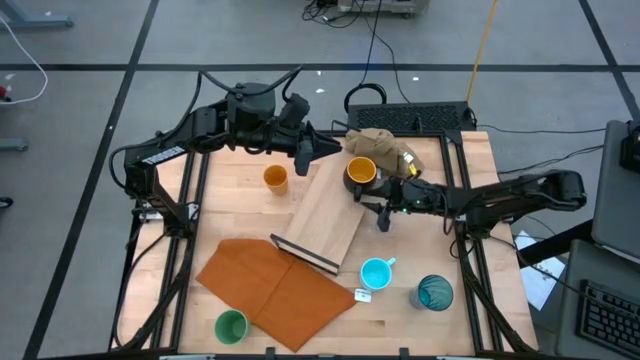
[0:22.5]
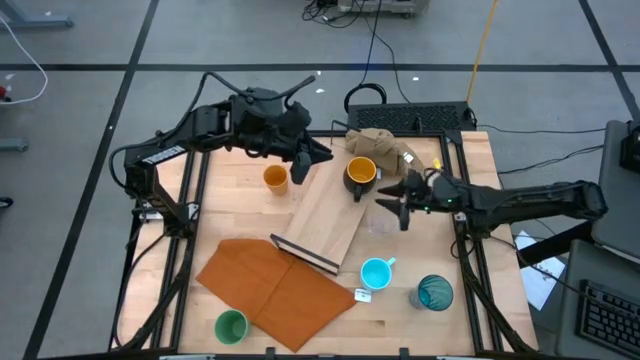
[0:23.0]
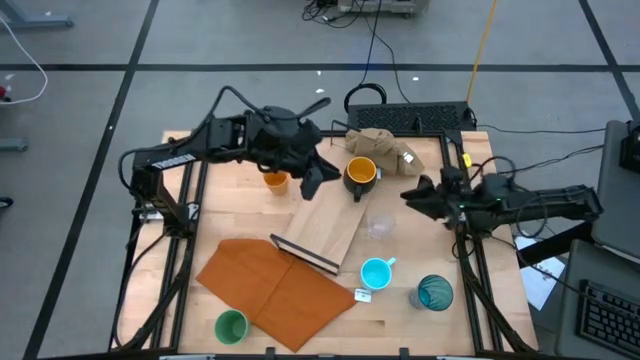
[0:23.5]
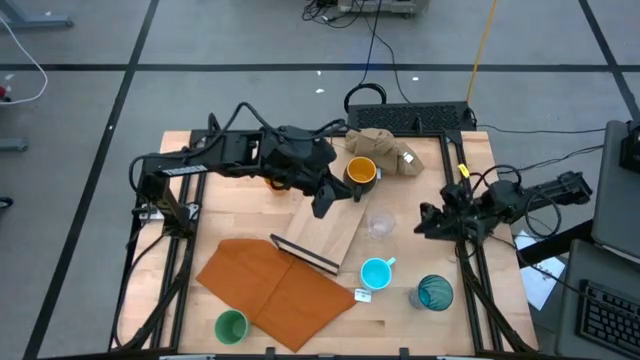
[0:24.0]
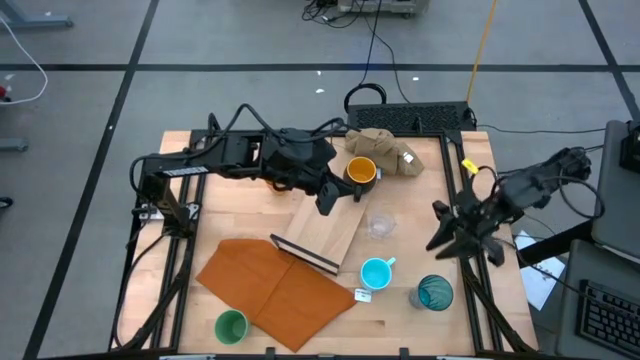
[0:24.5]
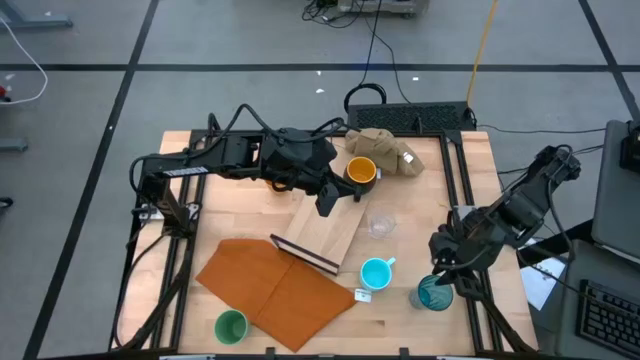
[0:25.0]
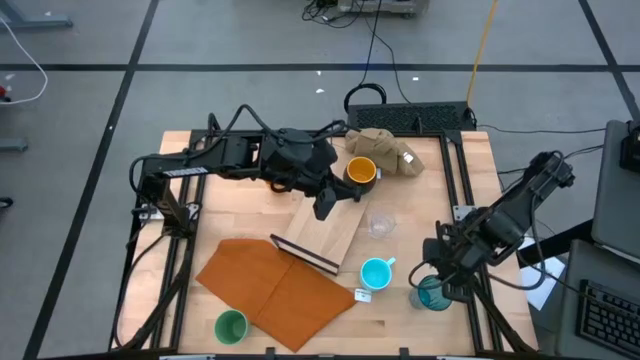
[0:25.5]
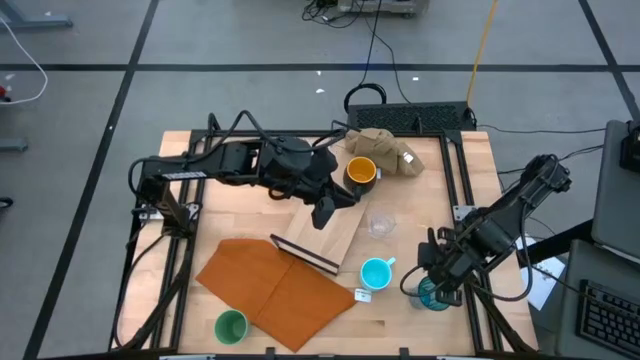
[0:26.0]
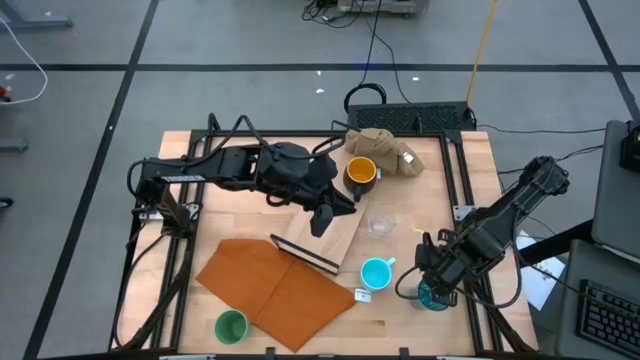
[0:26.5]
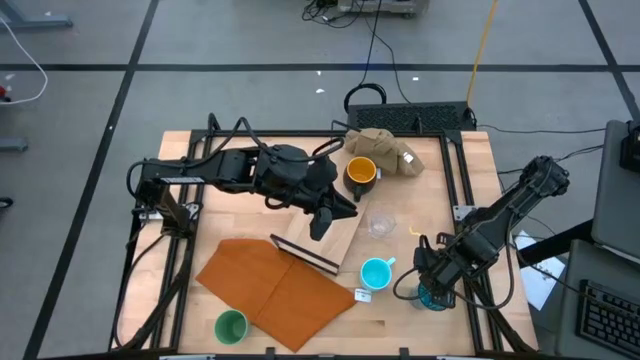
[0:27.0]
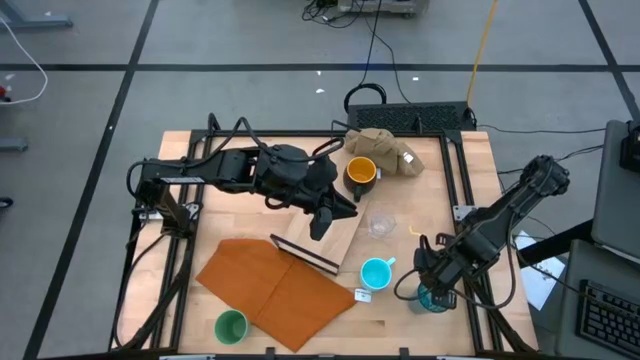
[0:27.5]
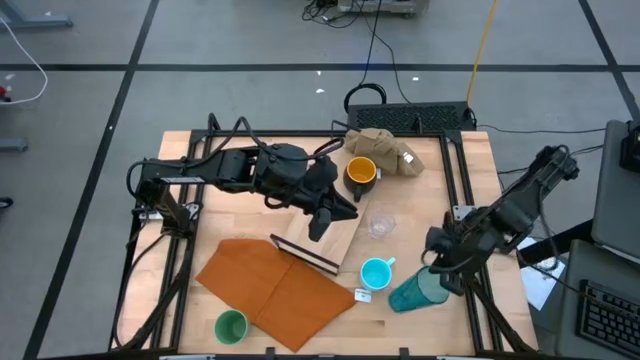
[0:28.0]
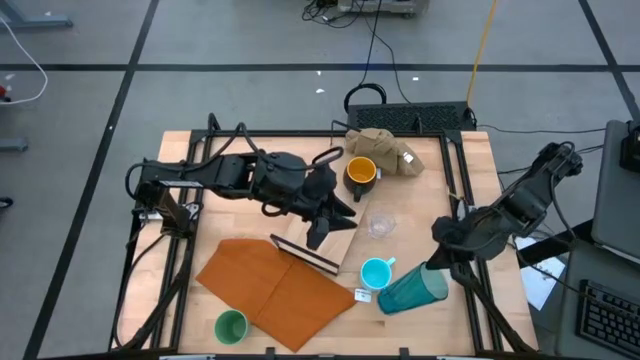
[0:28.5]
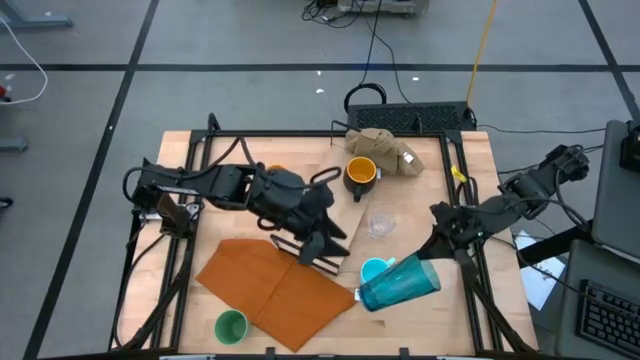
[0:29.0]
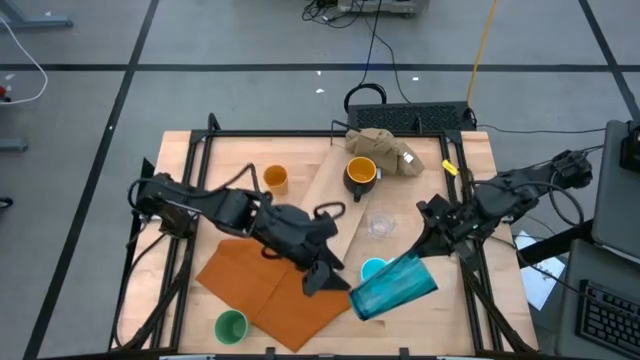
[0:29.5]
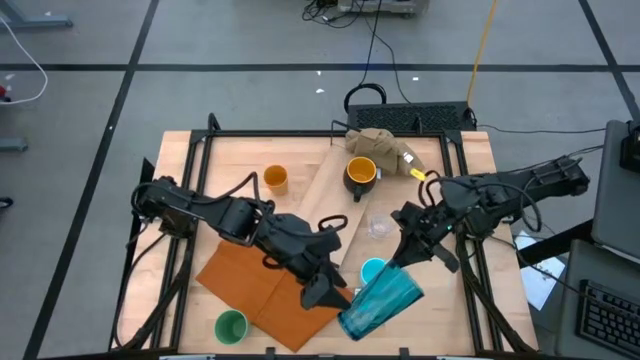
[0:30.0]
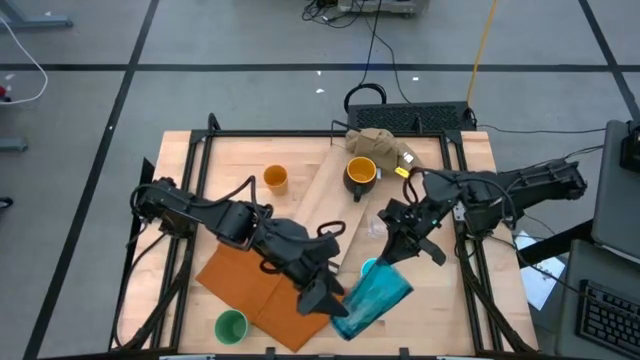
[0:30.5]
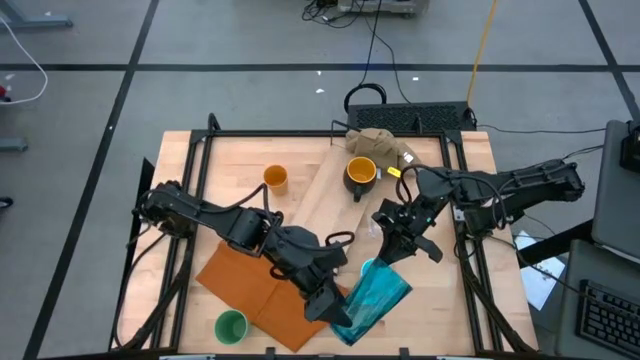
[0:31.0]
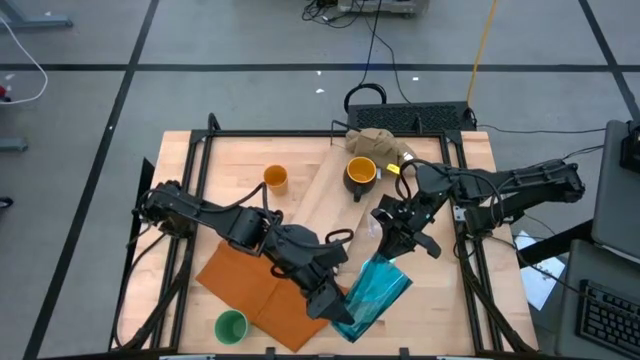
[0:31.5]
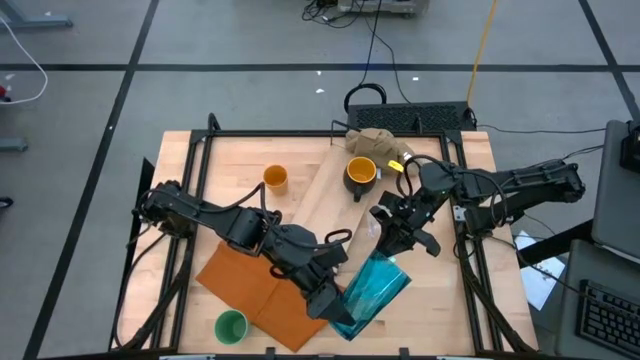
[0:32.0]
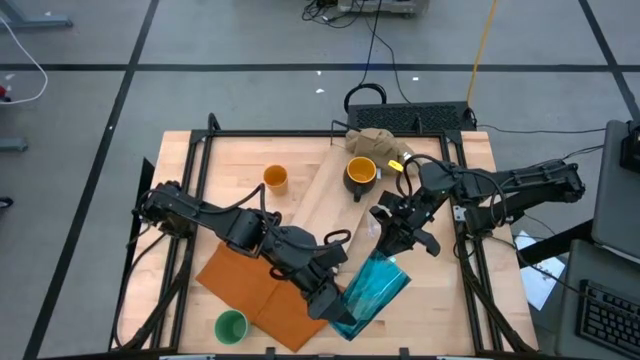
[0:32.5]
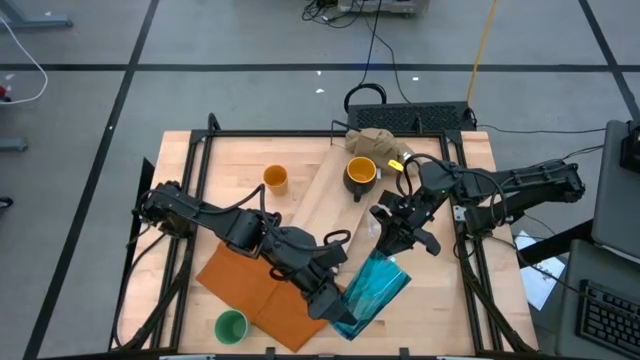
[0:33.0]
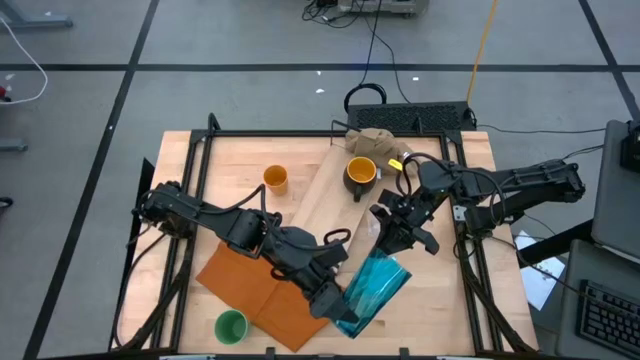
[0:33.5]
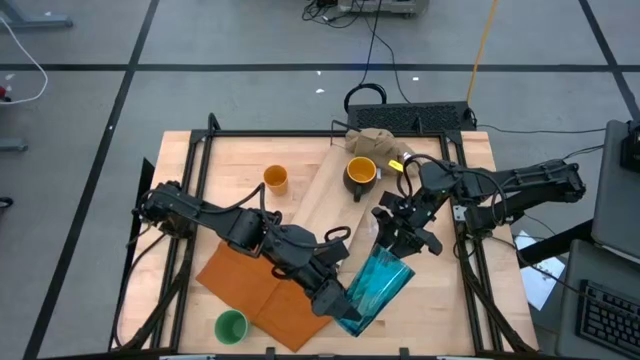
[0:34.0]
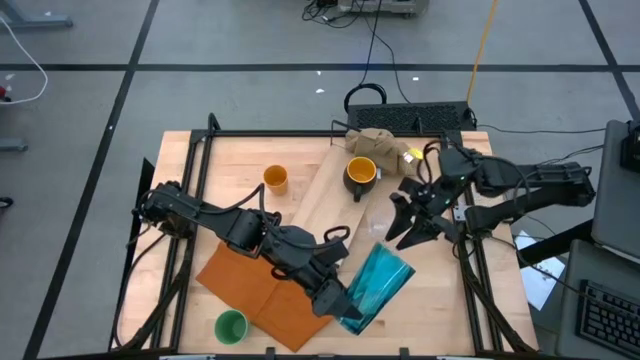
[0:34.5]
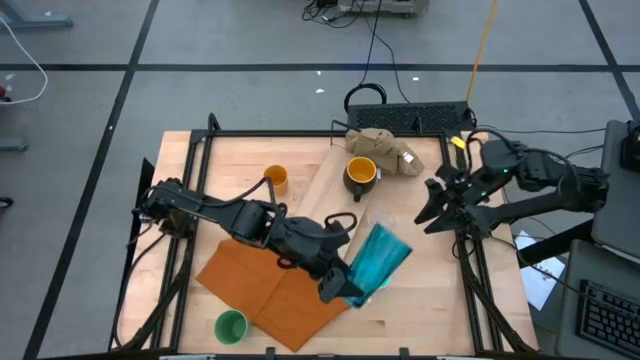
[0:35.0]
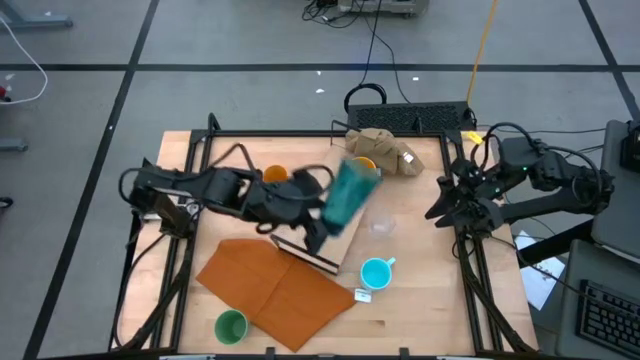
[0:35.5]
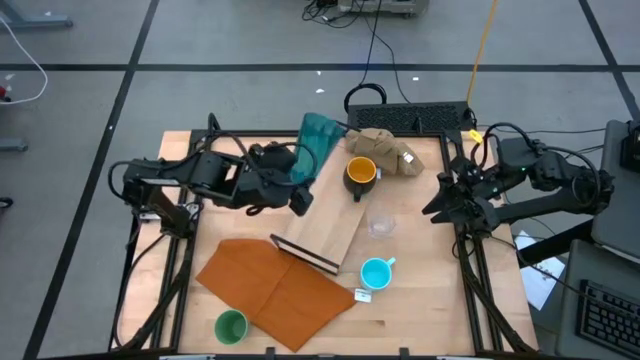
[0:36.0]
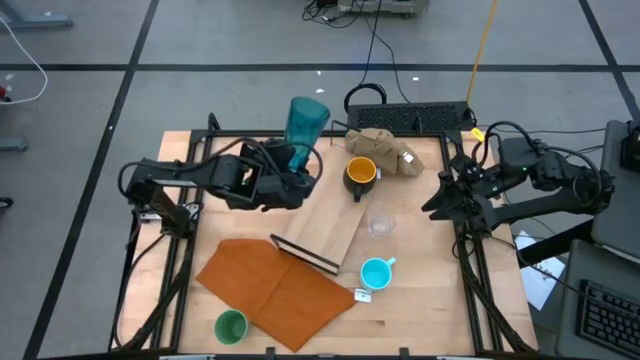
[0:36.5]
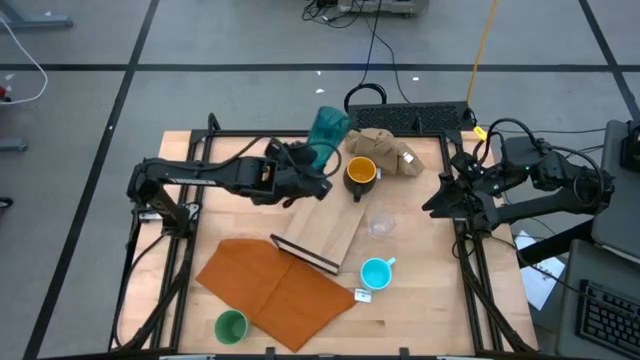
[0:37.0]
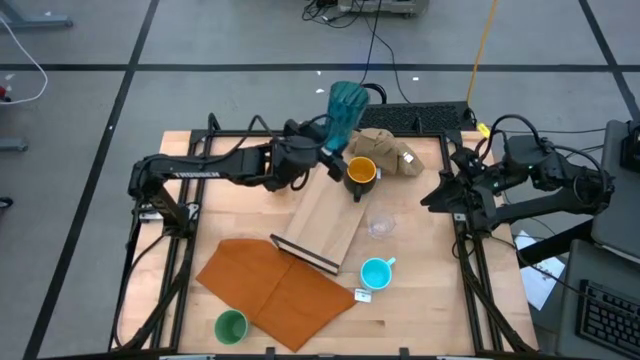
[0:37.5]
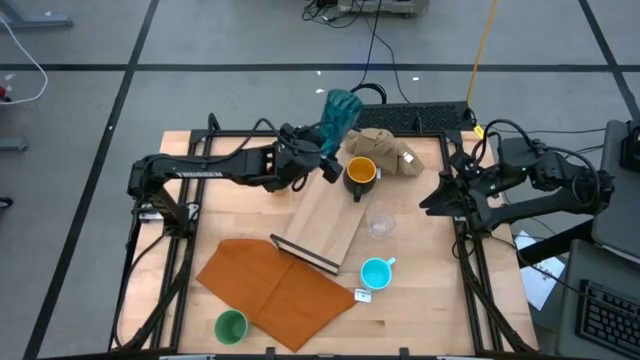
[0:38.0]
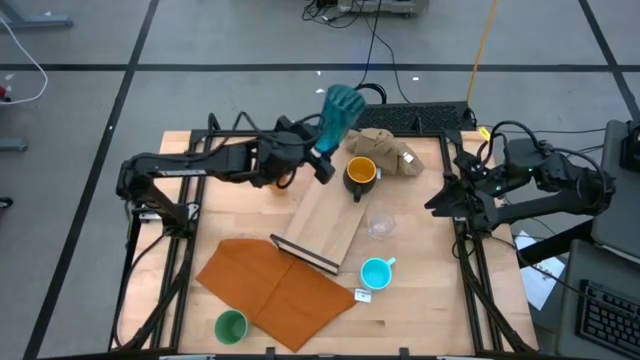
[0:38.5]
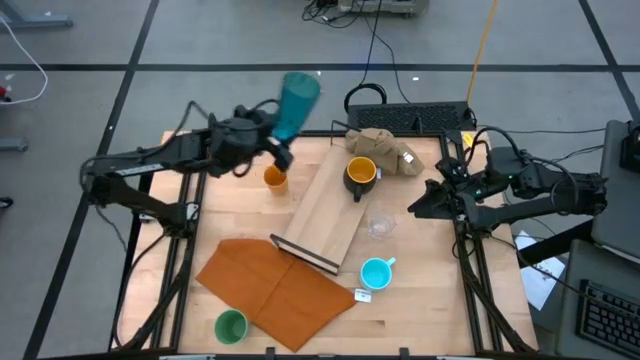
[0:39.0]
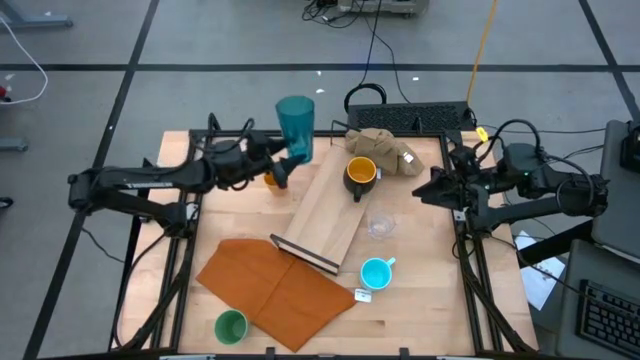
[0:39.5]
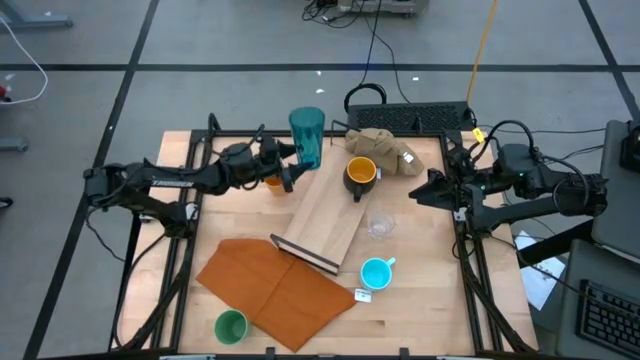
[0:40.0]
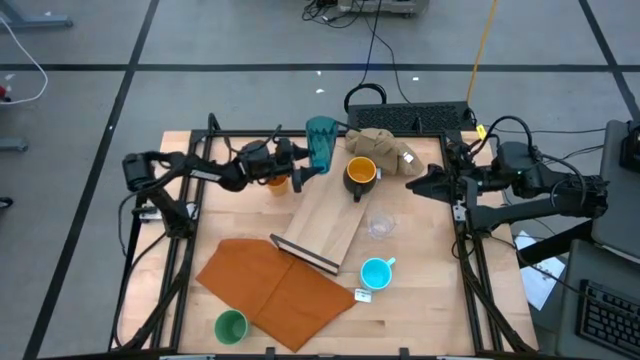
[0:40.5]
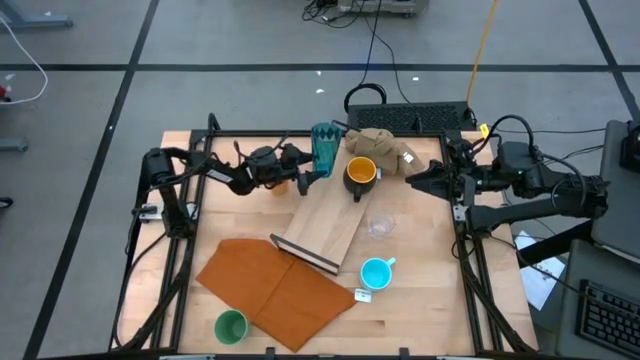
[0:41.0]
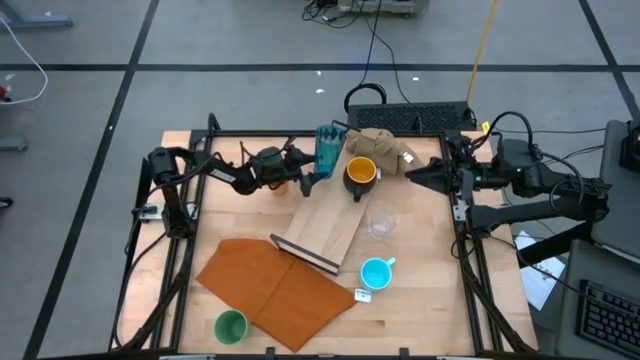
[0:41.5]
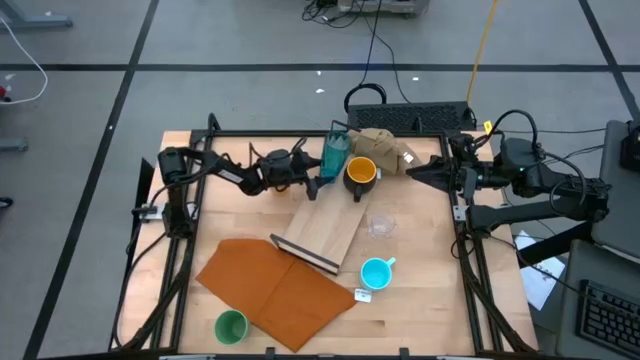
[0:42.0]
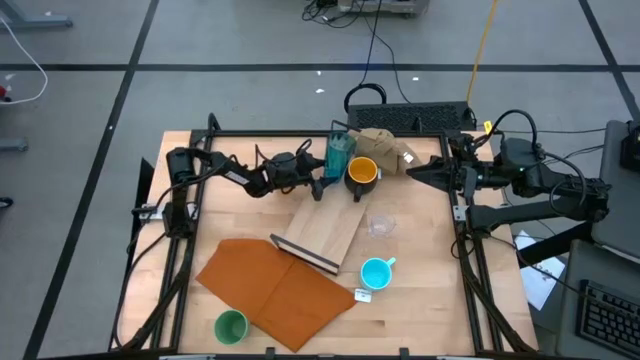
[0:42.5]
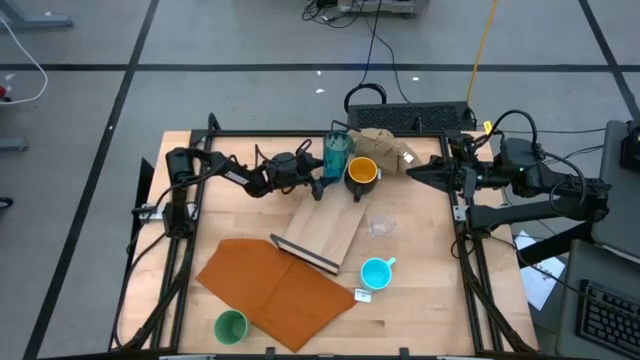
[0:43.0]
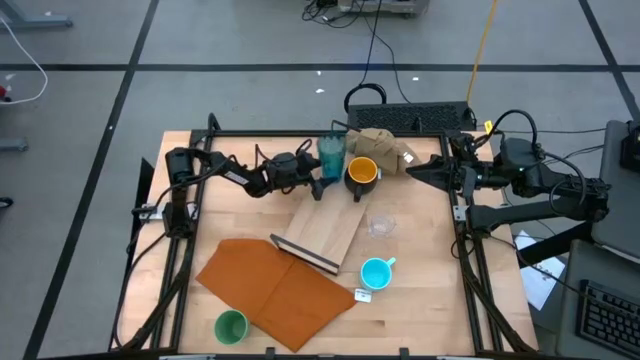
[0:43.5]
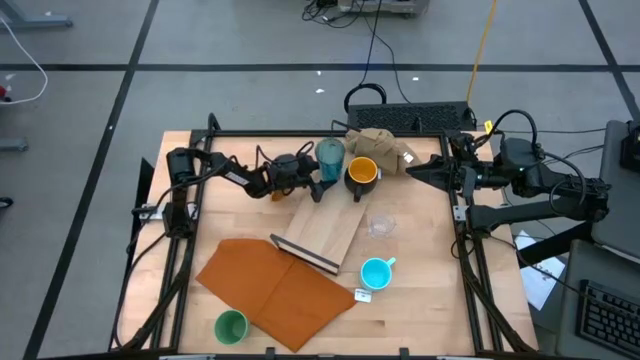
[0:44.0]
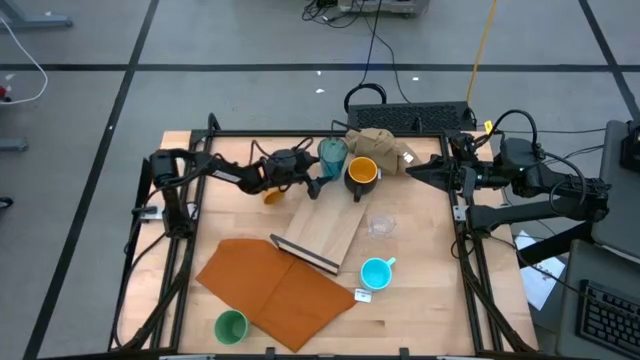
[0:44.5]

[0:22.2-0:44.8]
Task: Stack small to large cups/mugs on shelf
Put the blue cup on the shelf
